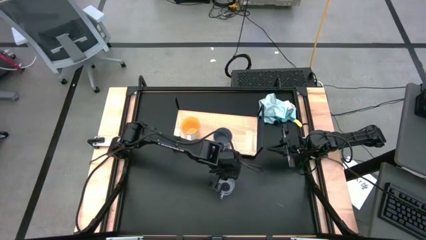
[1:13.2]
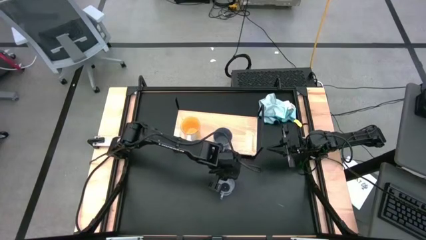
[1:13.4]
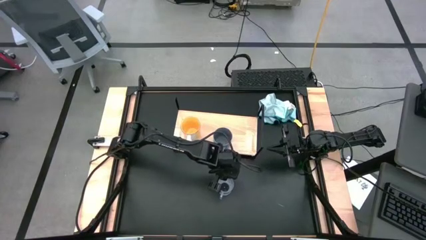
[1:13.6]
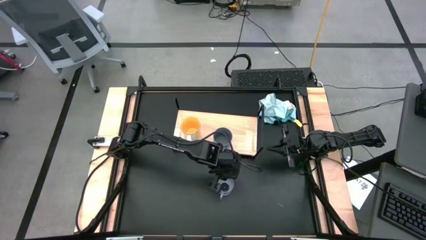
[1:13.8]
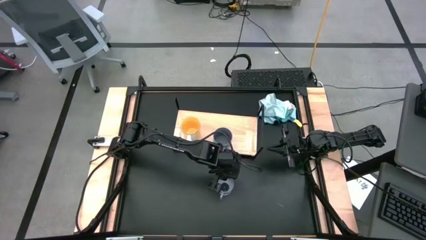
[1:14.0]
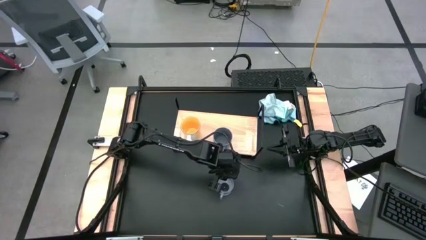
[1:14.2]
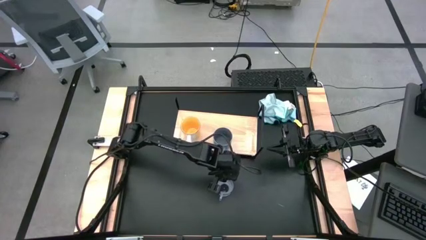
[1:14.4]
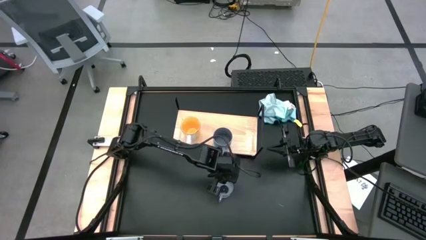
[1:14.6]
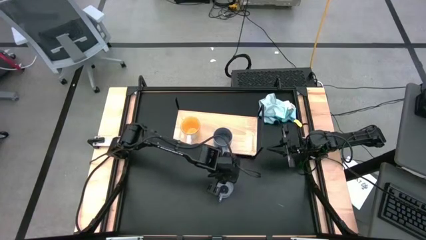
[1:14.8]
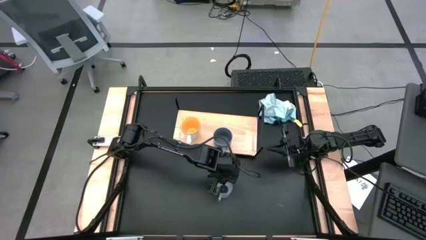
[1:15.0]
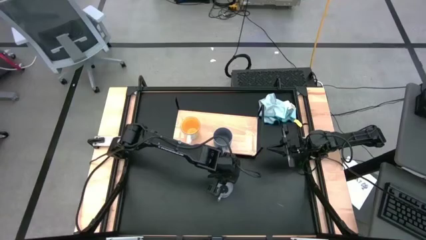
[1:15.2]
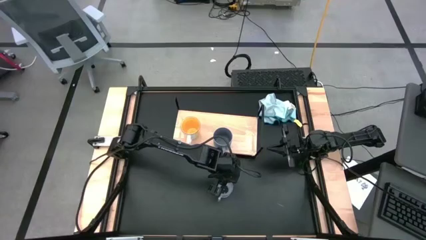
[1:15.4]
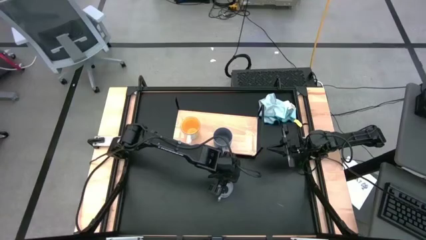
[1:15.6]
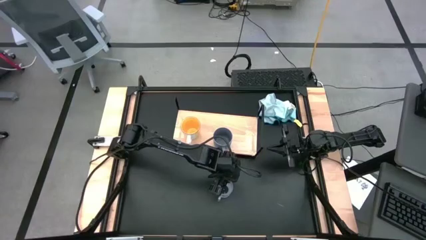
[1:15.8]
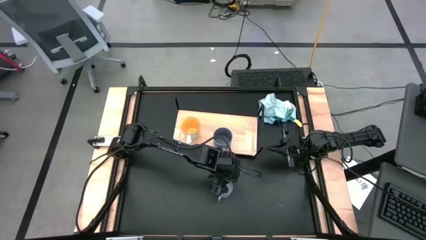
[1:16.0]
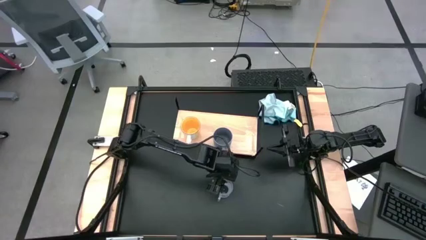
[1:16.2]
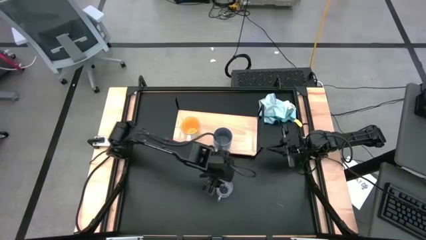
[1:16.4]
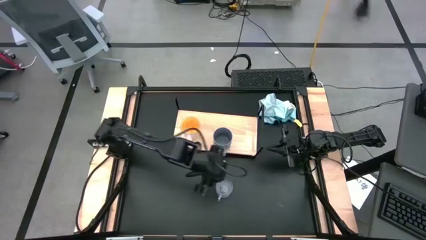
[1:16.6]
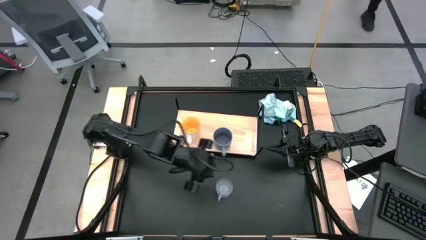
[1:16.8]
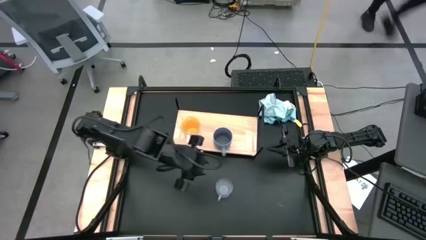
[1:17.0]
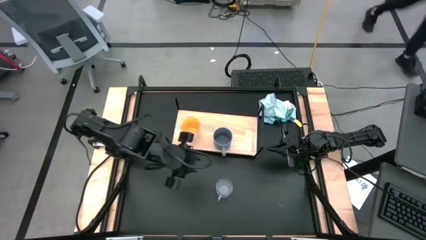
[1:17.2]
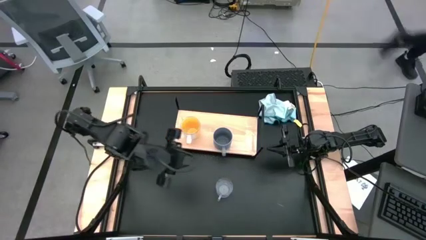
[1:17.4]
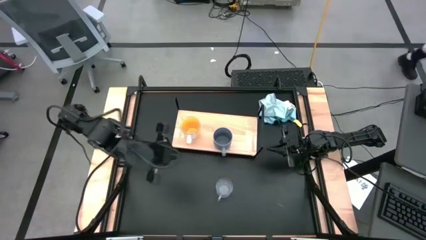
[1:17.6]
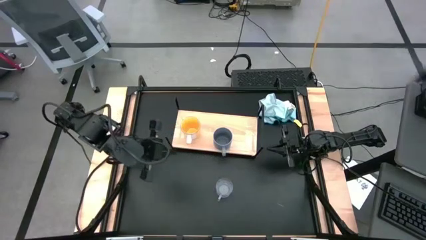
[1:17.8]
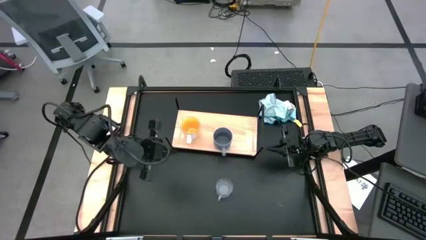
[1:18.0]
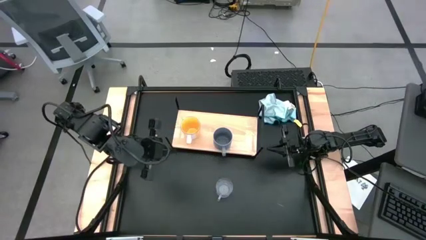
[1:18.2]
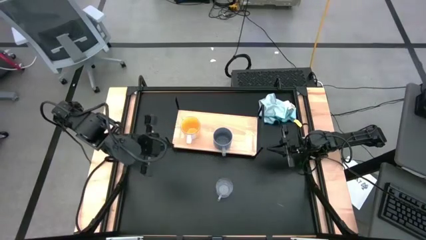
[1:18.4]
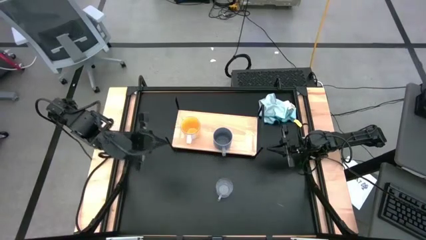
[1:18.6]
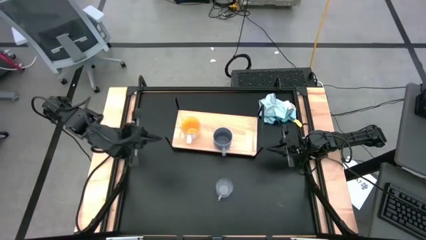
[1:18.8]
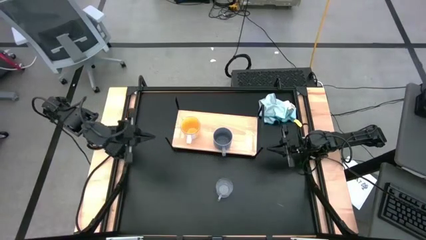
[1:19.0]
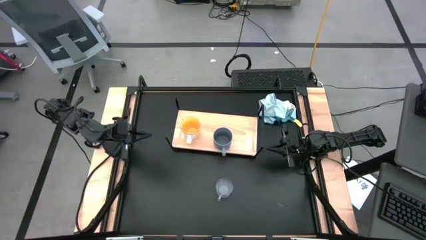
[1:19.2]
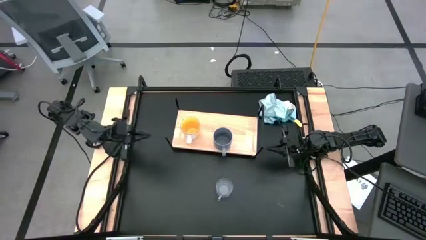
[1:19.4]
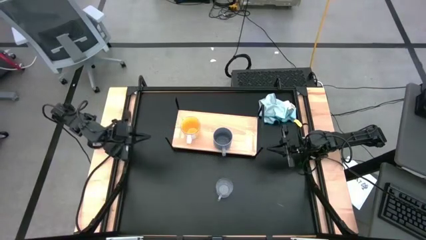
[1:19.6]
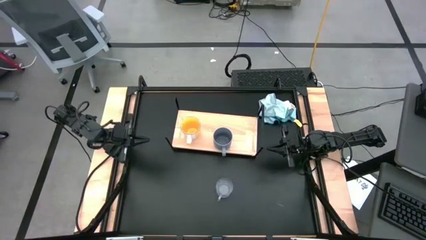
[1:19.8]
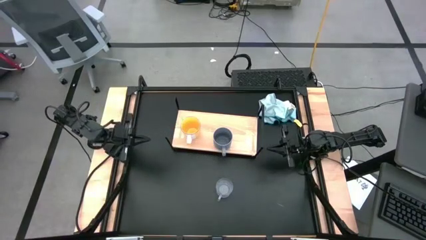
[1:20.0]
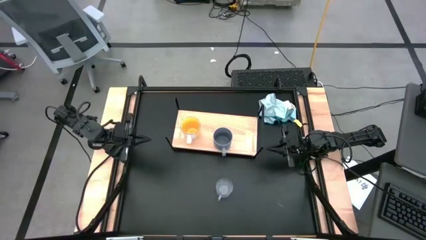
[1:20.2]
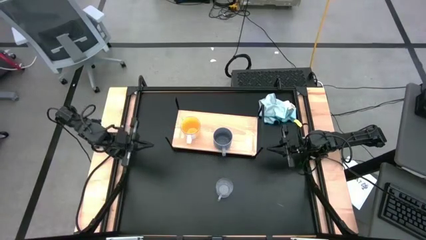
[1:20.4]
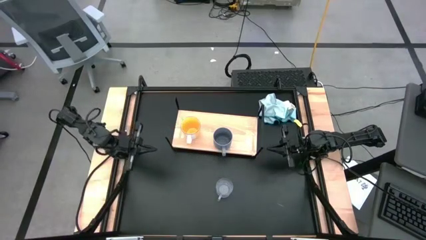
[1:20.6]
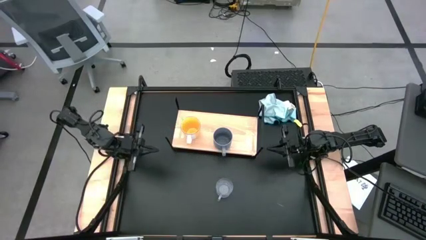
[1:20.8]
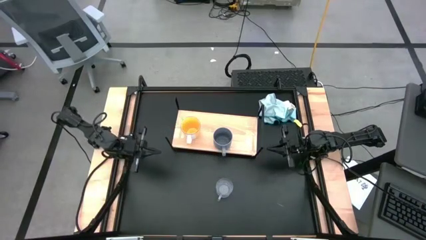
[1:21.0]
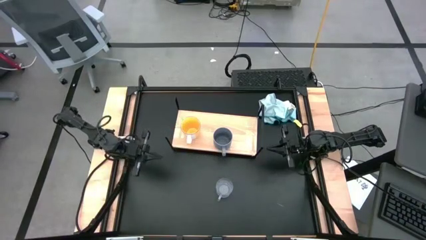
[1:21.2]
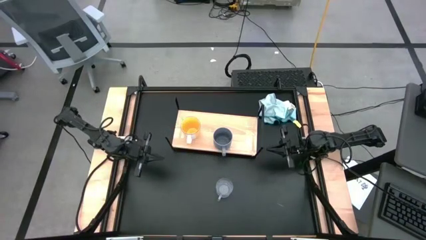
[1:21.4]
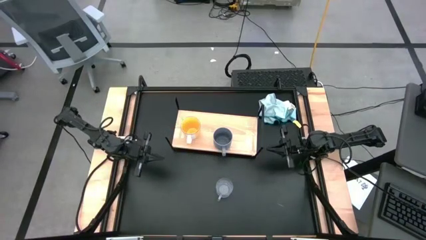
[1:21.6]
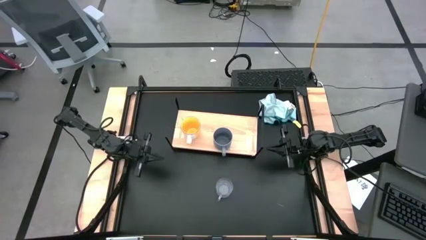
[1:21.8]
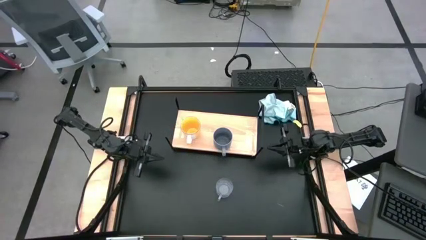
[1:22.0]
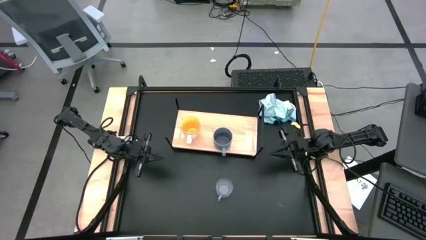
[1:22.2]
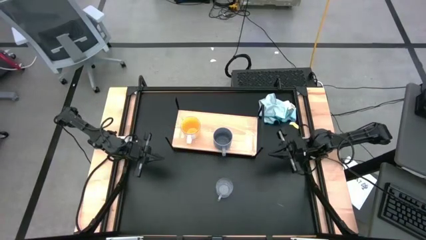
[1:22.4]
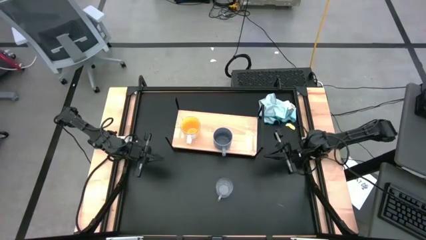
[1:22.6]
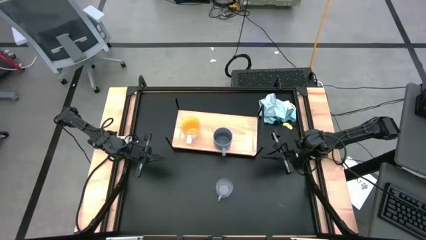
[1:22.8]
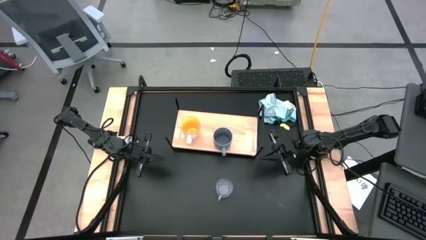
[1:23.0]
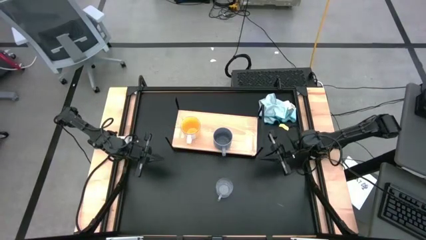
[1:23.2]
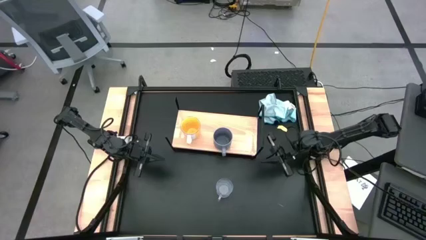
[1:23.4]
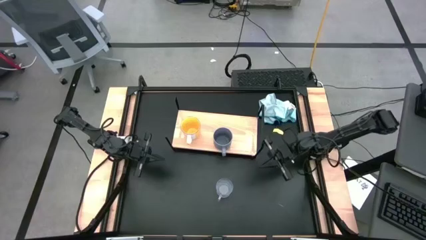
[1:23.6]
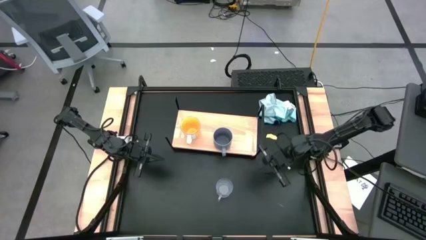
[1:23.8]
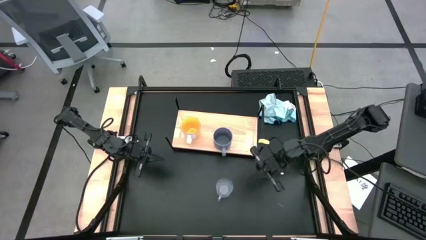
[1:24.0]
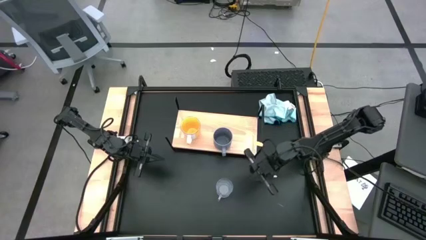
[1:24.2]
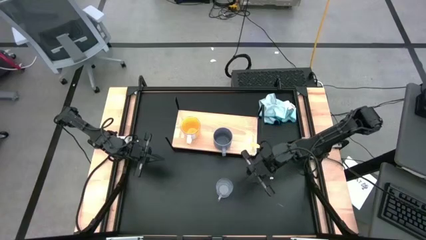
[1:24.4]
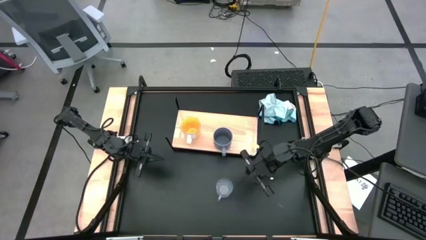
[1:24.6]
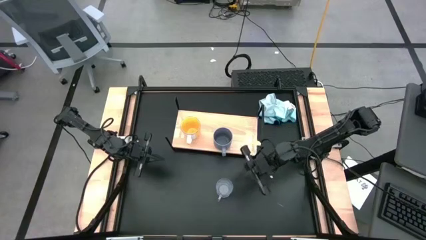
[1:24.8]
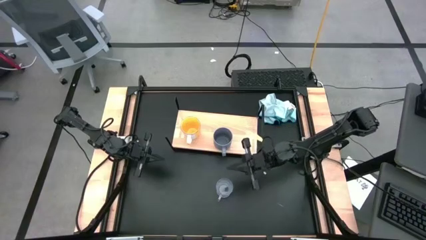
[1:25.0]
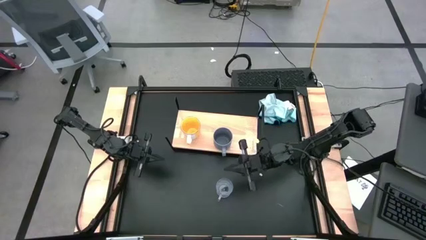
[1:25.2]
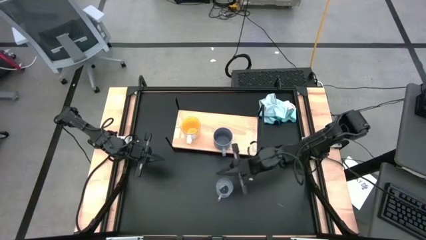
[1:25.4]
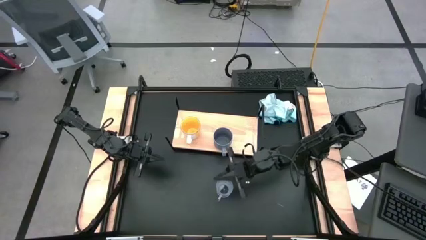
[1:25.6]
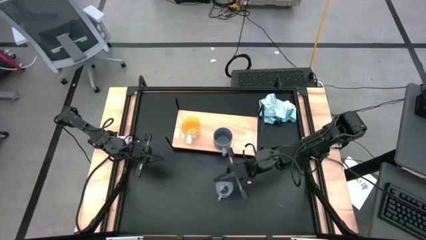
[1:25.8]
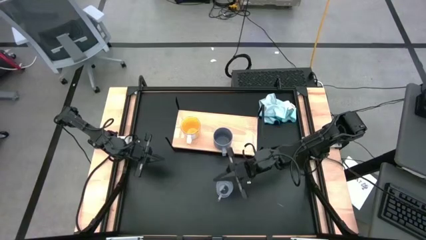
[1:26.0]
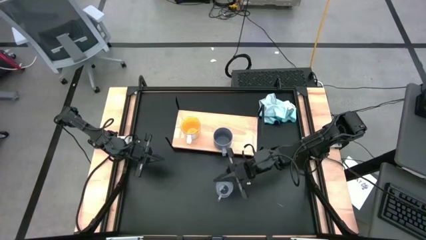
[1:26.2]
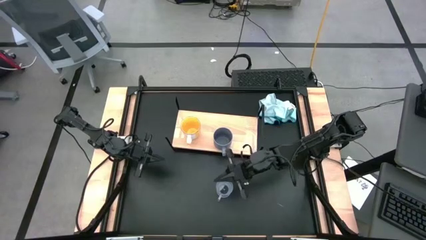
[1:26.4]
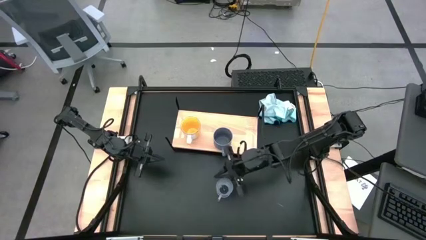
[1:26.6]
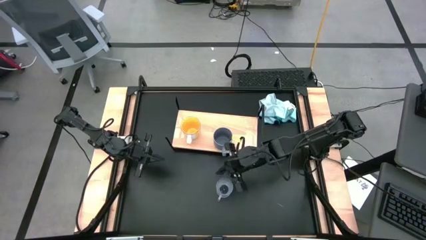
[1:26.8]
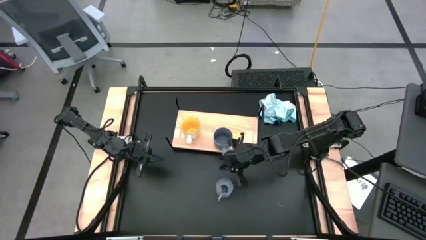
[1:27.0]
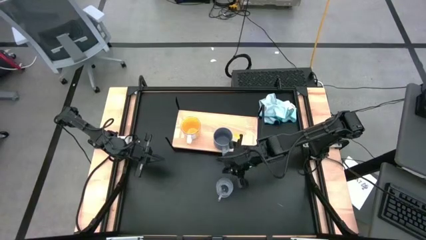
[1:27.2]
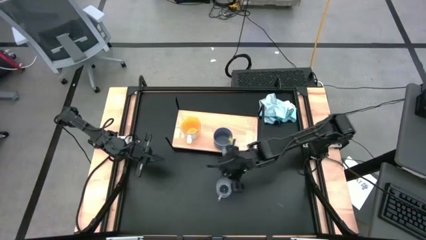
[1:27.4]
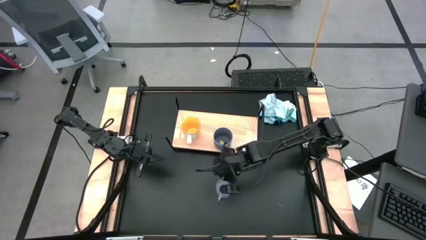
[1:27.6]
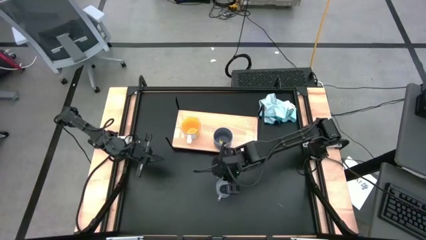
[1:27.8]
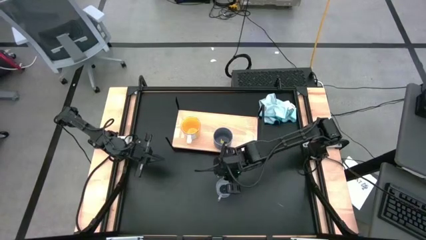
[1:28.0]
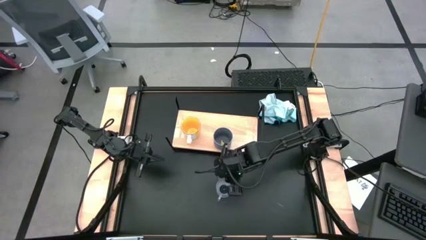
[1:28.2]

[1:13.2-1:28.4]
Task: Stack small to large cups/mugs on shelf
Put the transparent mug on the shelf
